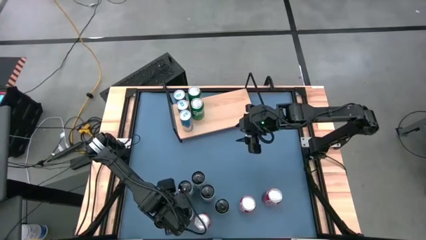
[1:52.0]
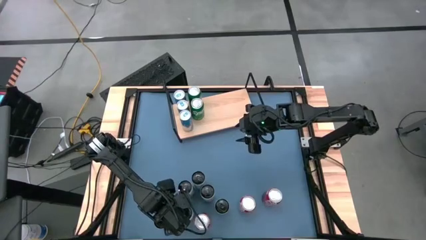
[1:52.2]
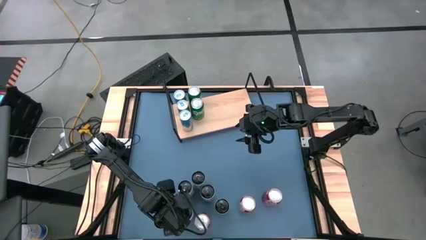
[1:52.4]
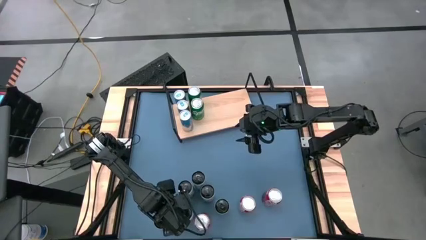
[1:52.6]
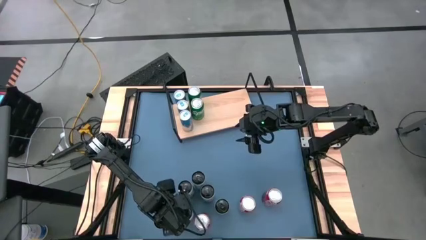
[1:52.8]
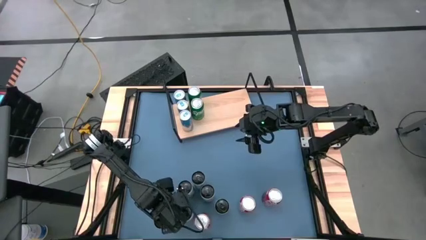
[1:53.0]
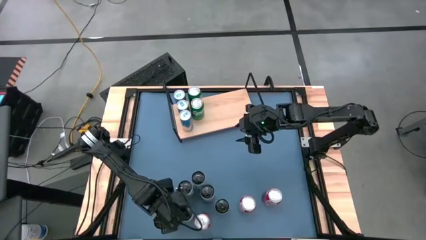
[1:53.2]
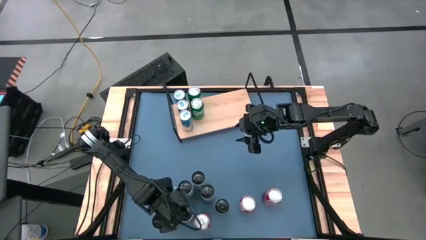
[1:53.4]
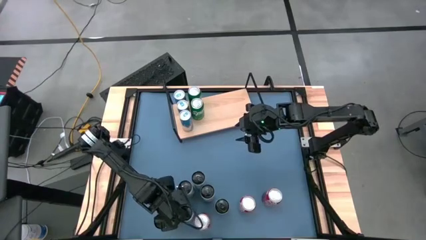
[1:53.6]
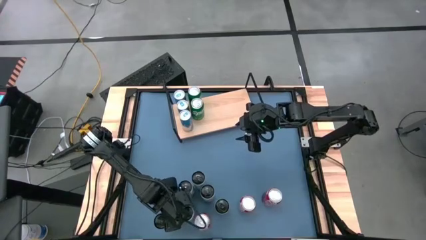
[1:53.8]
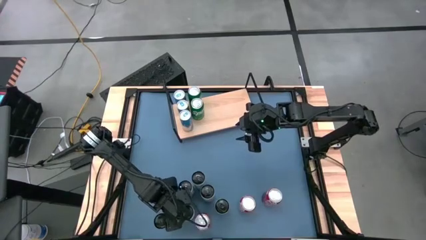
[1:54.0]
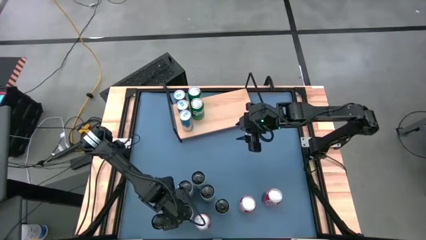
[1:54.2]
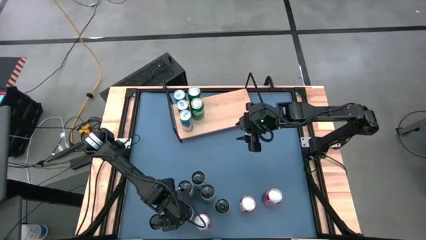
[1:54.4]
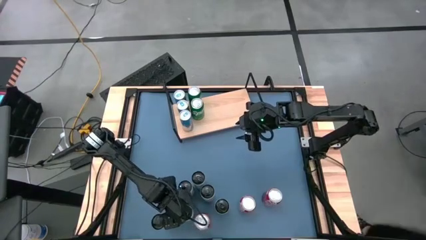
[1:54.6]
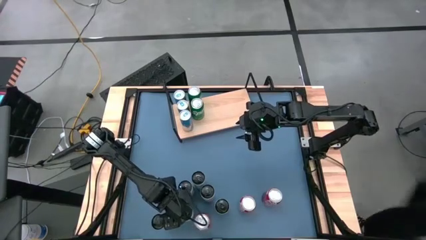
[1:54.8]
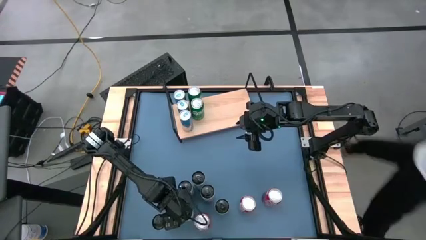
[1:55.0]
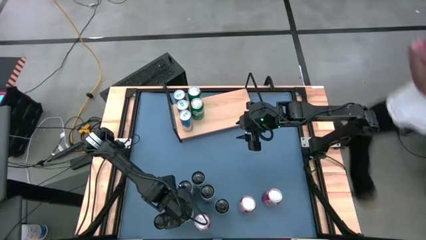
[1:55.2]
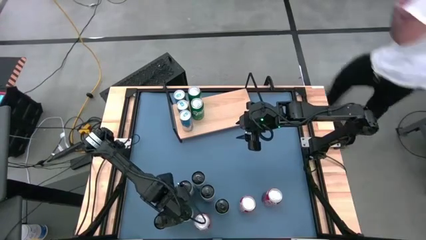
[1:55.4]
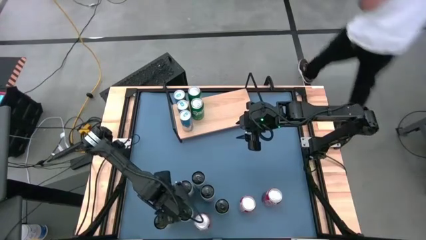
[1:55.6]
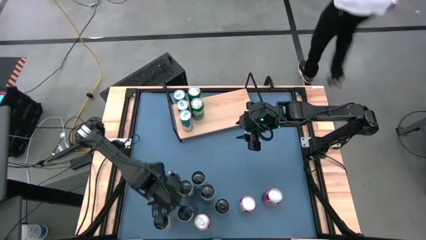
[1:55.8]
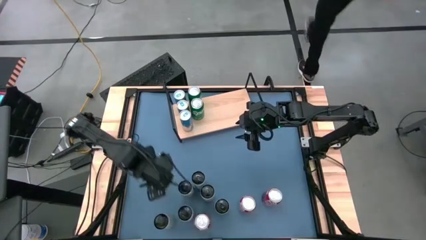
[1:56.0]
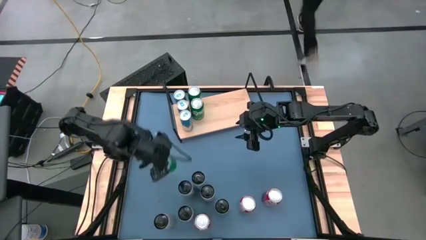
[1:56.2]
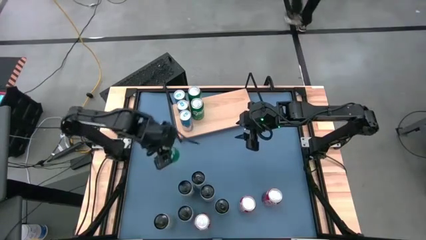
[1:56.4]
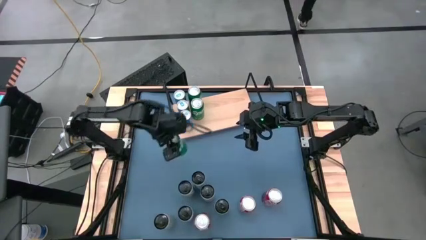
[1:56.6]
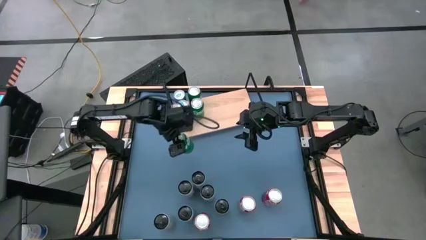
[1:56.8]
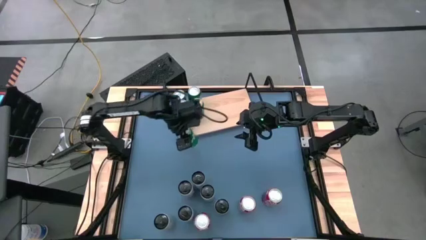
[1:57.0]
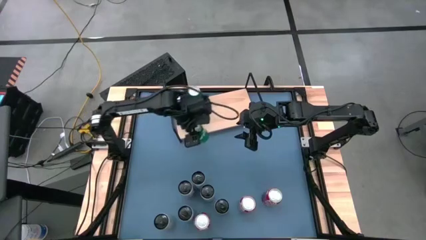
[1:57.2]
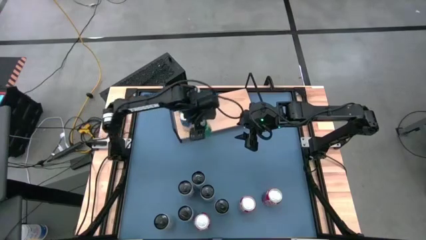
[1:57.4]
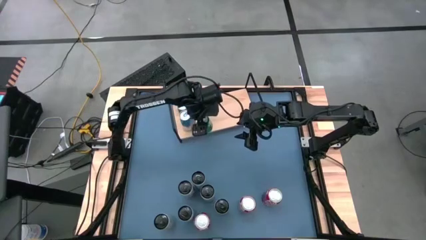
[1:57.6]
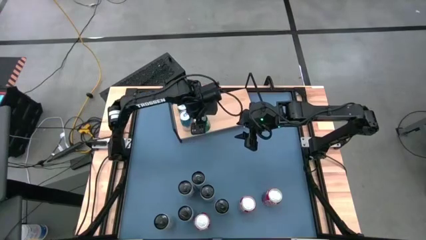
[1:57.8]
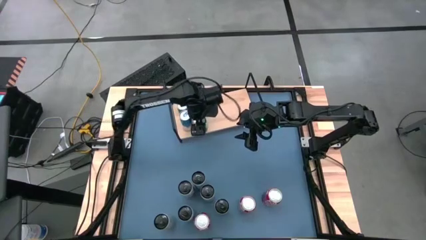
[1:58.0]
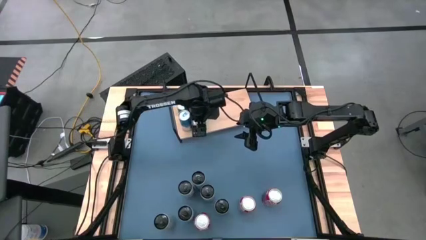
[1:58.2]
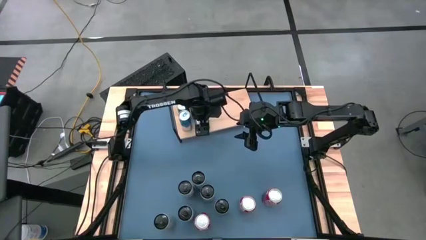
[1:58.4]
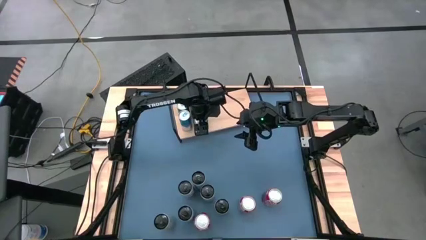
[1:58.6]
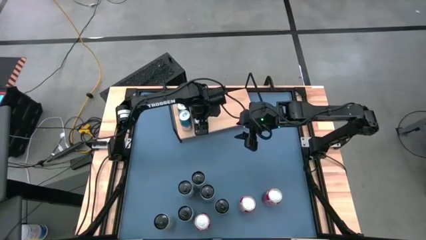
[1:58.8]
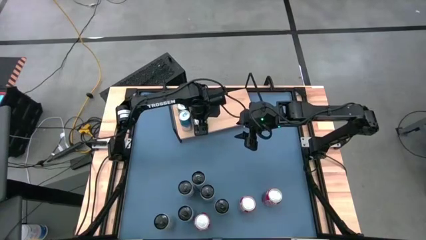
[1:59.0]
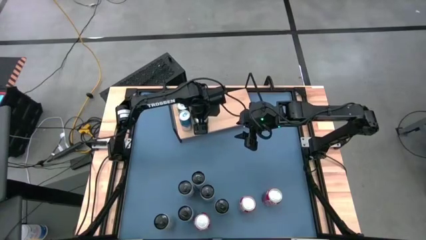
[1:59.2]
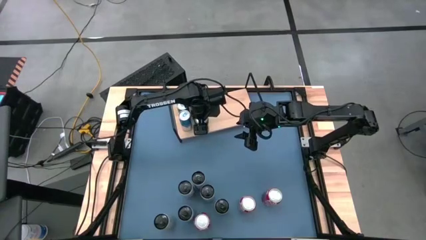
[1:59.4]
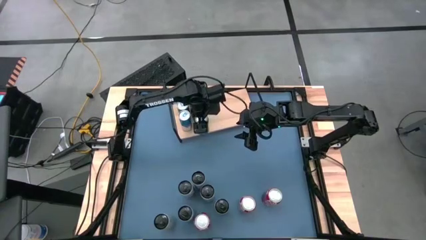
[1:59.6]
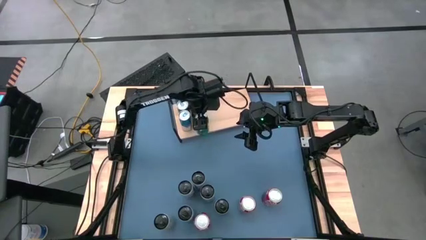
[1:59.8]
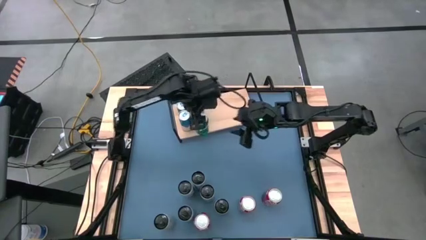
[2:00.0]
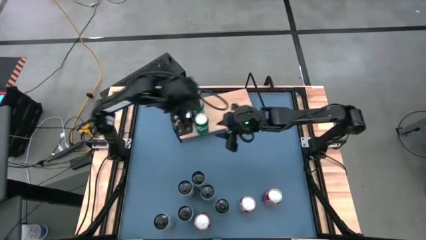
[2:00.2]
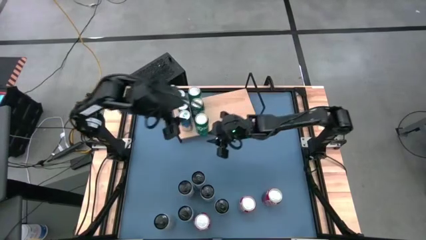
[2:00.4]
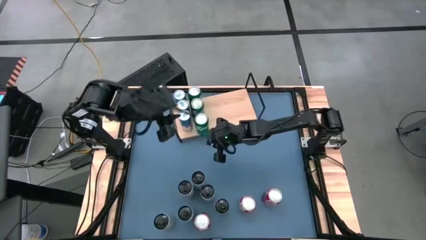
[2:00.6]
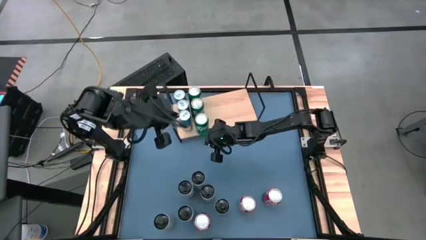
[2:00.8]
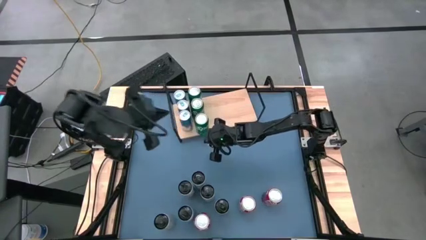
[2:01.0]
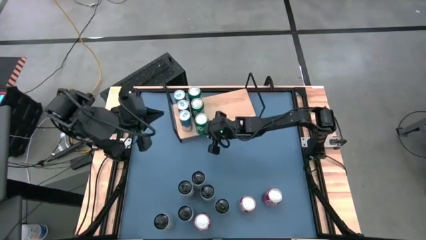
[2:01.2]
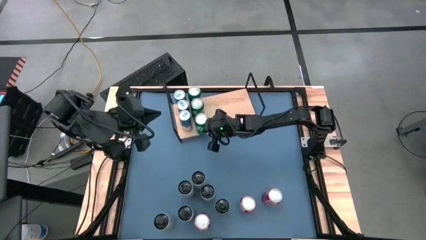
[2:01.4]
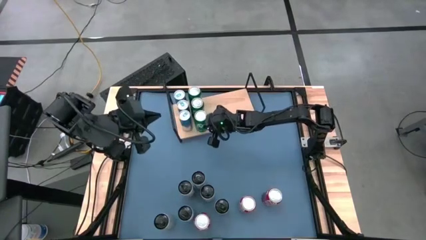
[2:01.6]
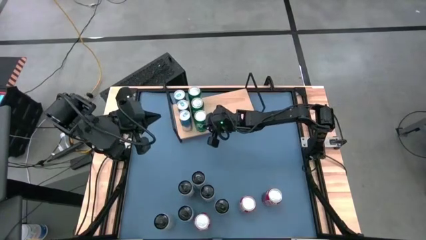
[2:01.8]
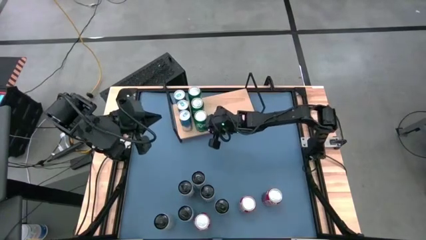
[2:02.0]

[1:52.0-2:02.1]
Task: Place canned beverage on shelf
Put the green soda can on the shelf aligned with the other green soda cans
